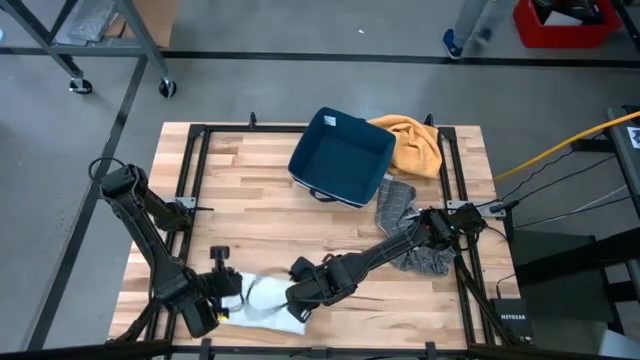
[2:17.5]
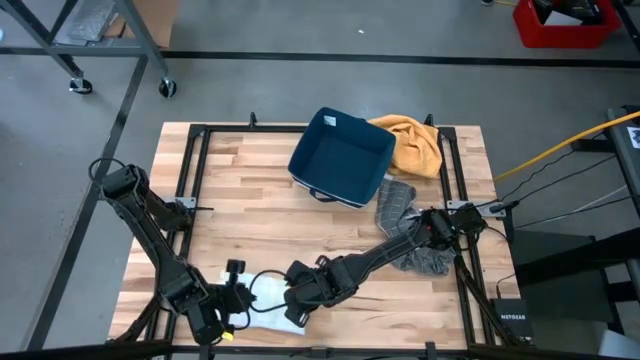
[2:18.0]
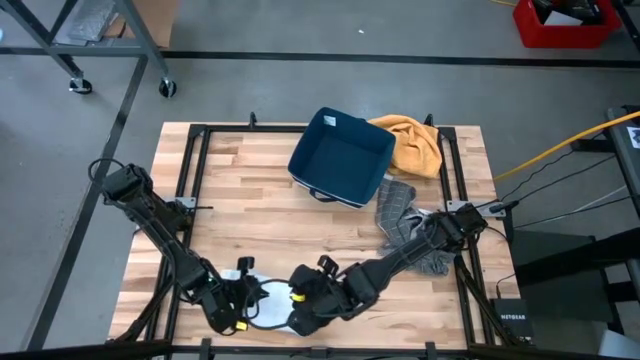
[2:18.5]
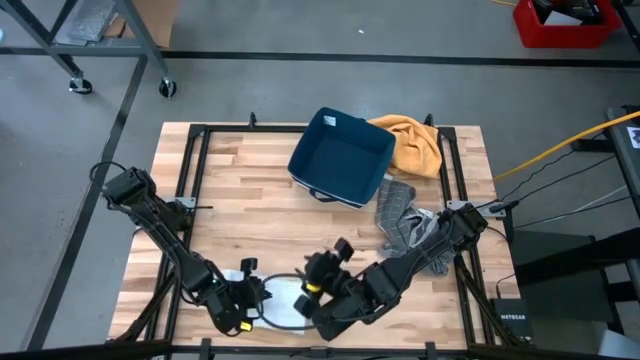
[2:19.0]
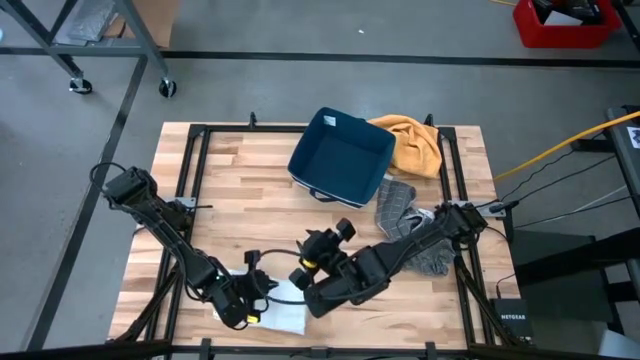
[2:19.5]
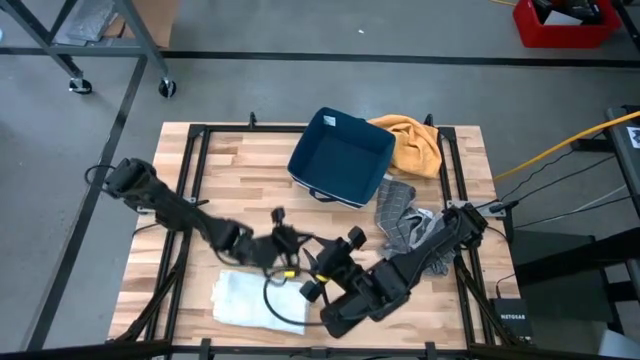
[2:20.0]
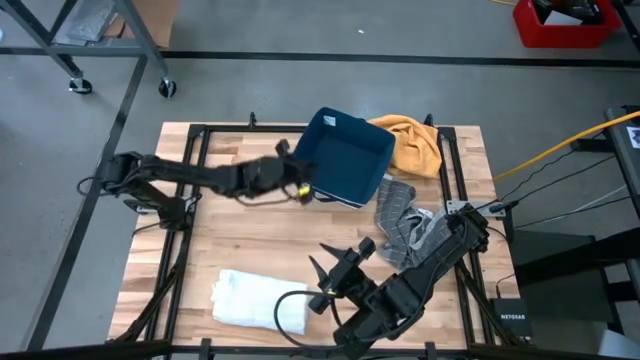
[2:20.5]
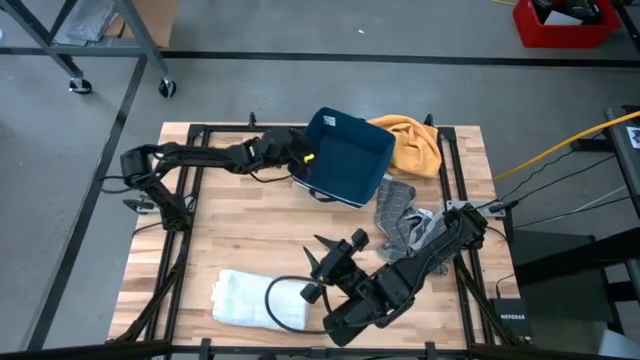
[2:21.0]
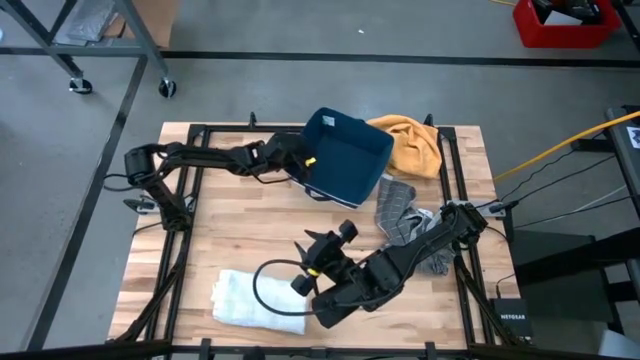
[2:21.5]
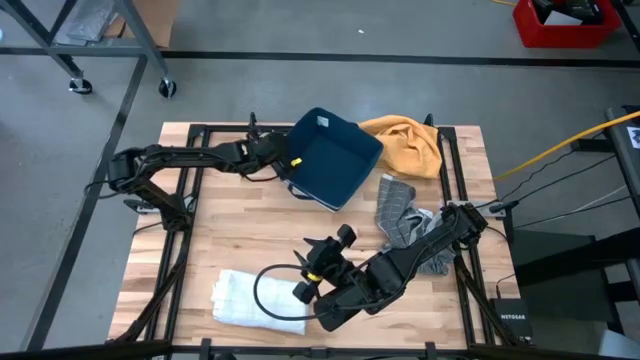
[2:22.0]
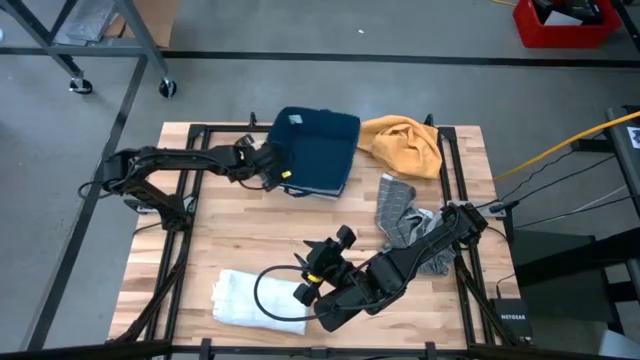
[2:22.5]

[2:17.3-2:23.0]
Task: Fold towel
Move the blue laundry bin to the top left

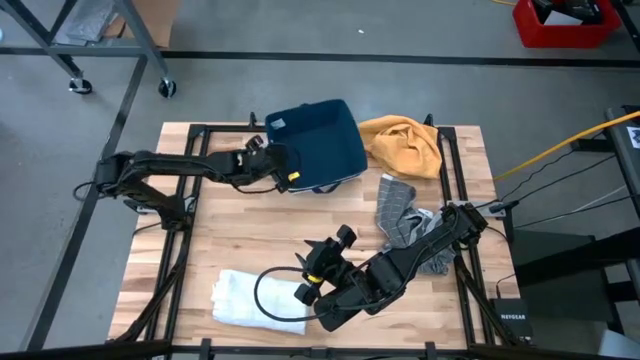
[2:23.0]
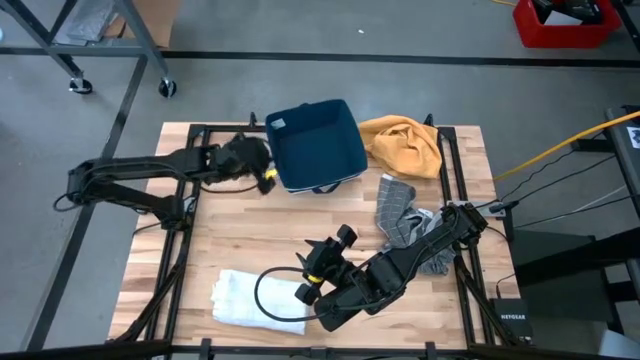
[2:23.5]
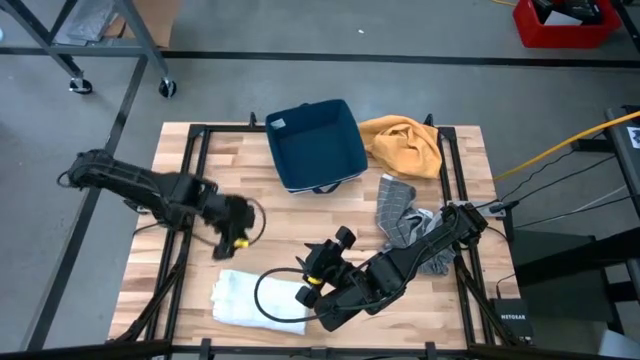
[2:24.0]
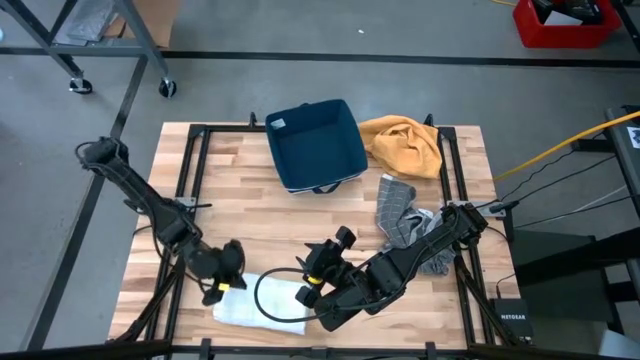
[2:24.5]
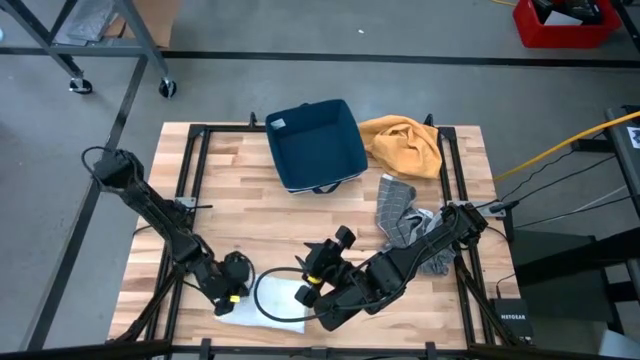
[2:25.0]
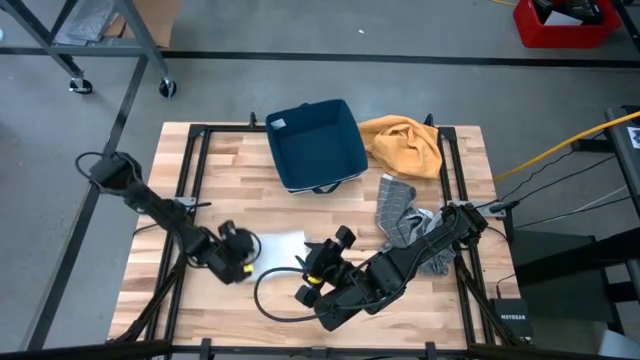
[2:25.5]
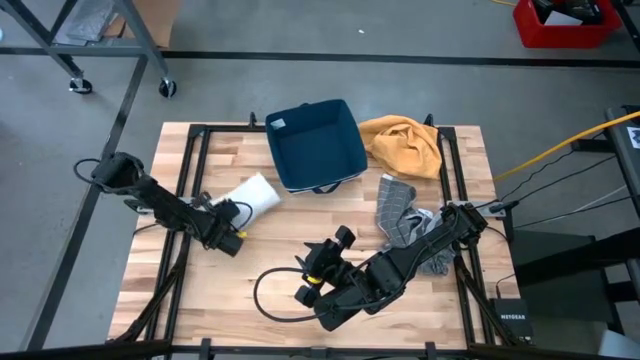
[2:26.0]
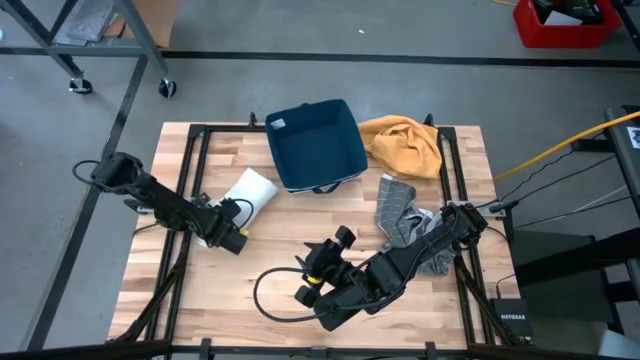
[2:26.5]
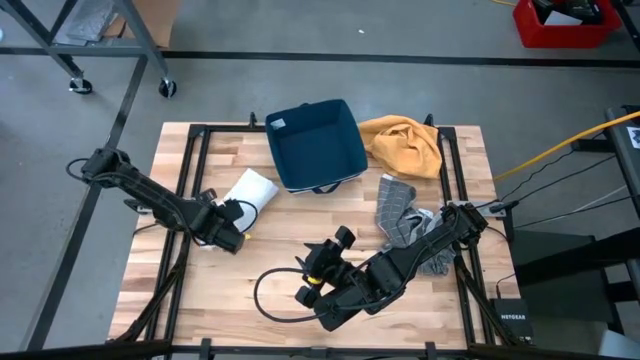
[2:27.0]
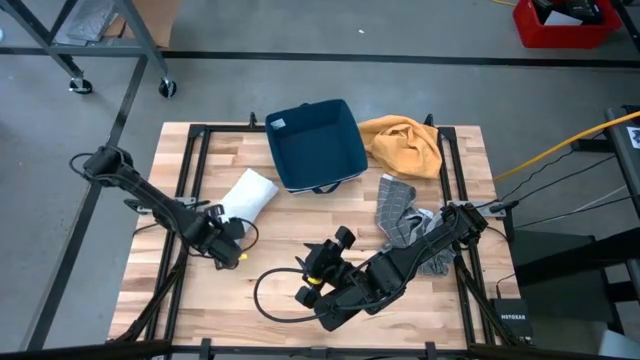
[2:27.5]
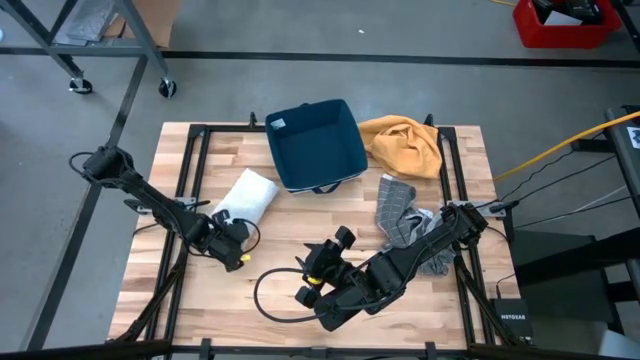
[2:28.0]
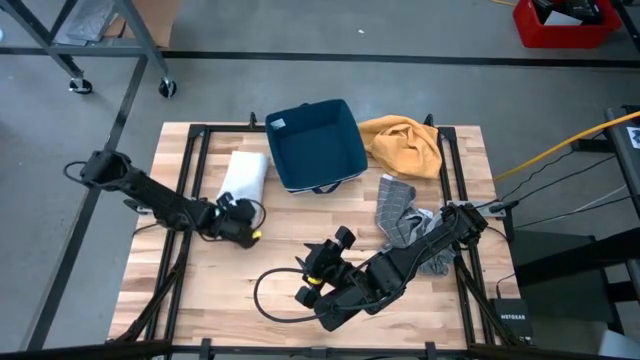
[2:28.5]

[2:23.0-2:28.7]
Move the white patterned towel to the top left

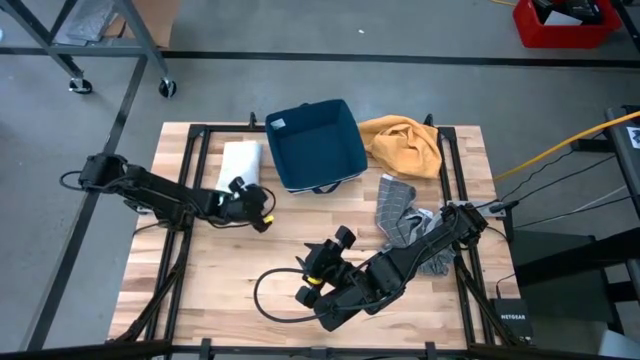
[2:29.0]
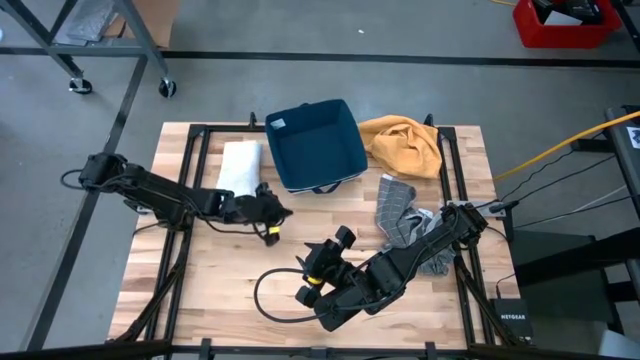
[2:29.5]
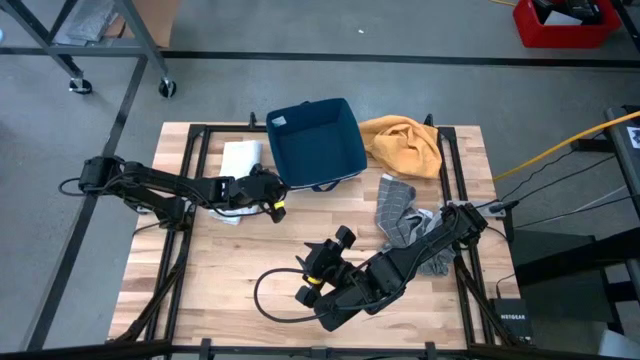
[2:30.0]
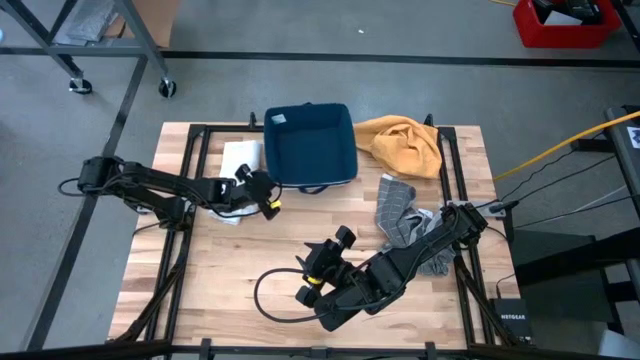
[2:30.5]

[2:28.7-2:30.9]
Adjust the blue laundry bin

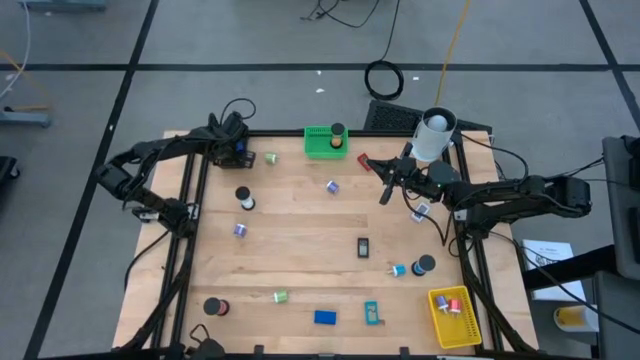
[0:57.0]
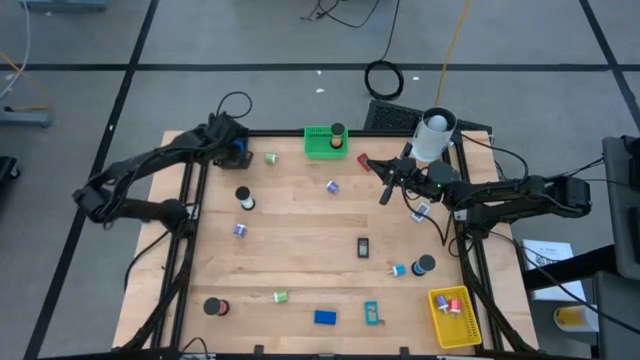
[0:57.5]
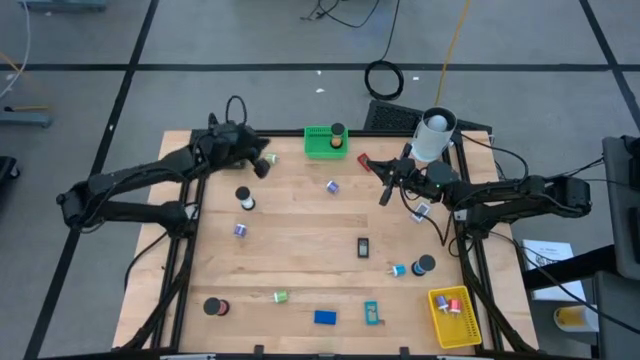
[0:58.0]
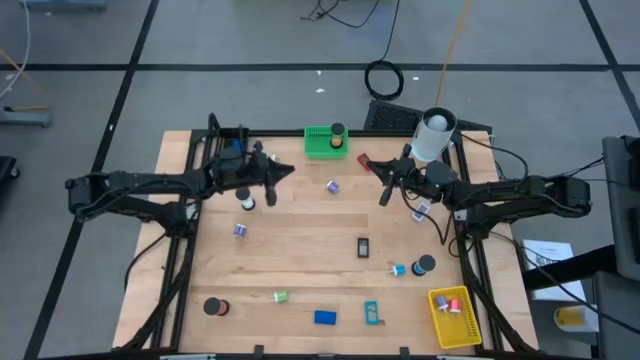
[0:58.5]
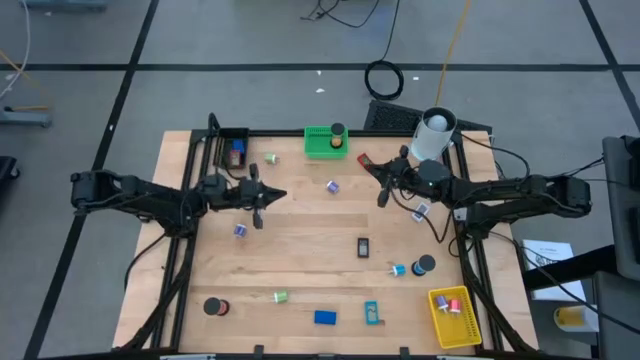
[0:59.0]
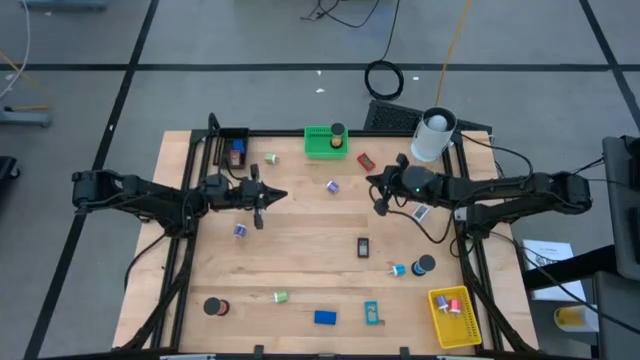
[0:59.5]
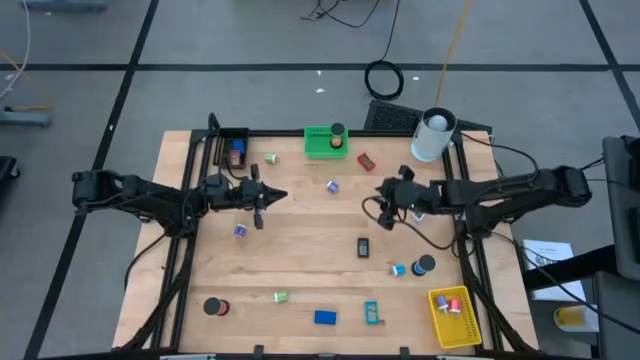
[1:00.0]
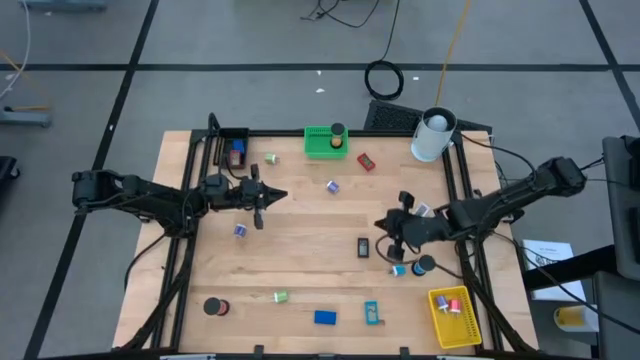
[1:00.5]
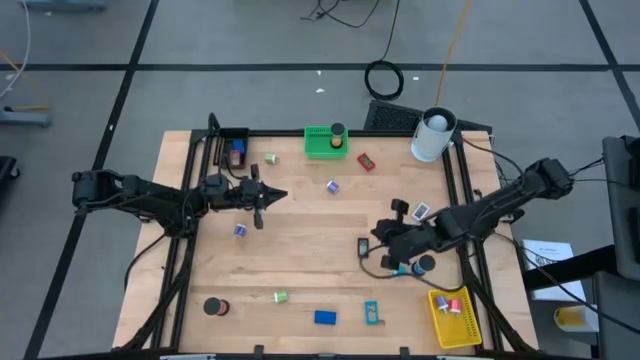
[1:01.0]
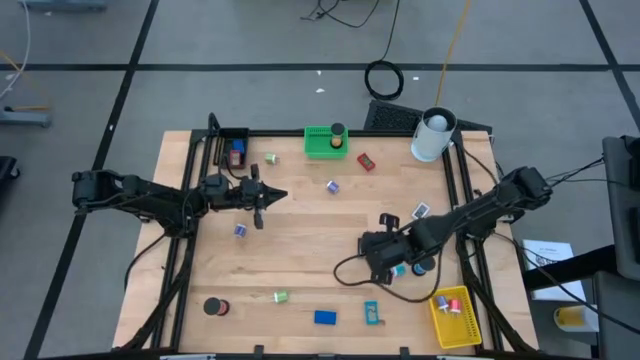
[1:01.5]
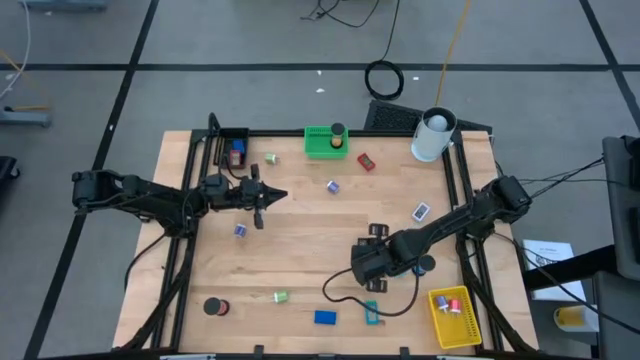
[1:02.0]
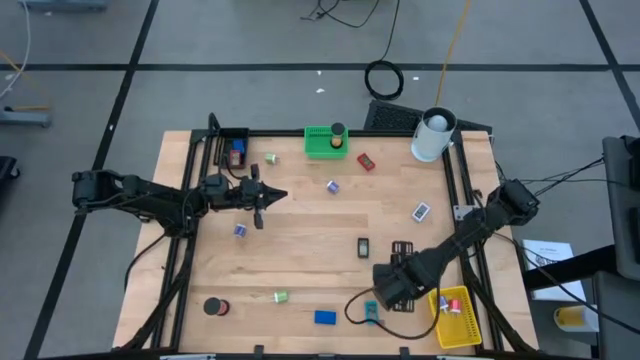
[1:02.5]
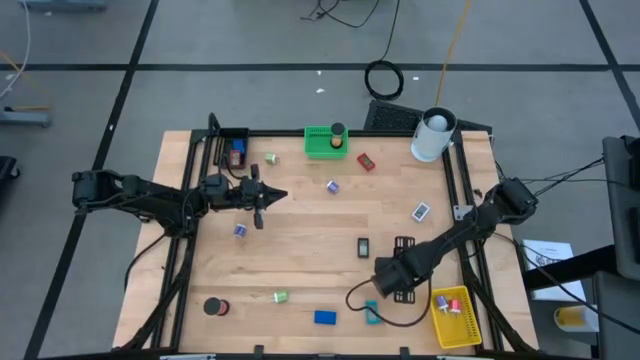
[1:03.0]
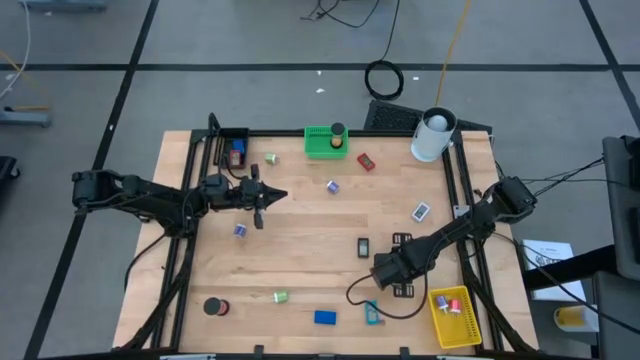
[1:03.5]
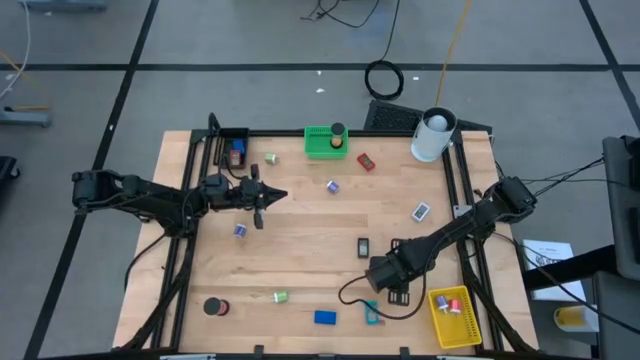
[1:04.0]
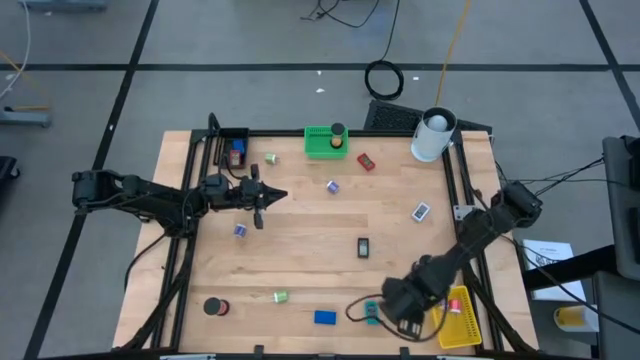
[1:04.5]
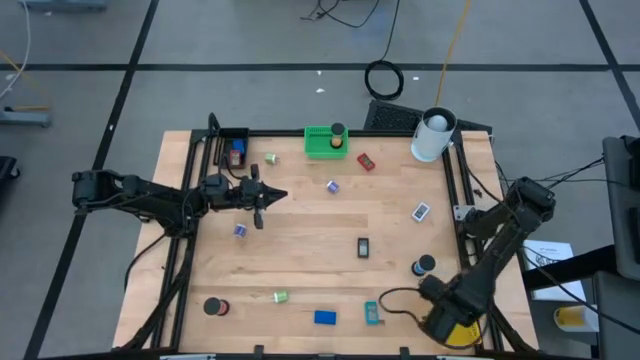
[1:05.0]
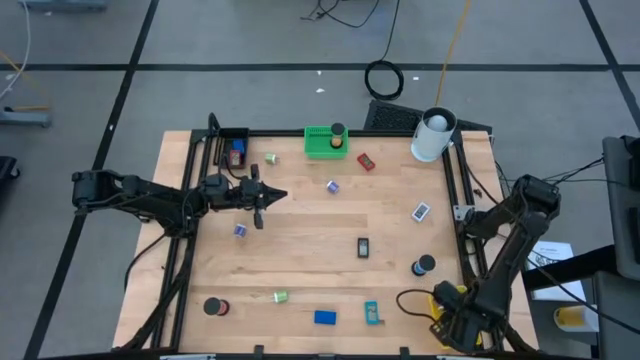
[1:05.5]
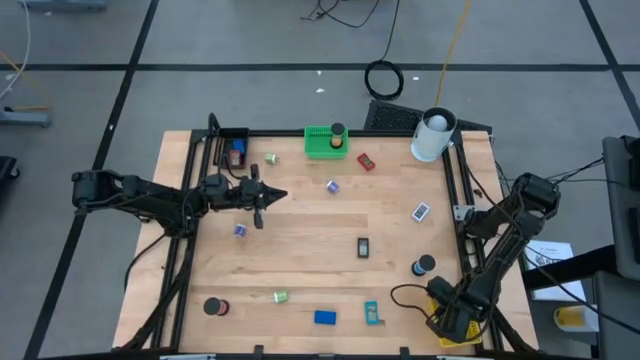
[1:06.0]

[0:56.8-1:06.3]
Task: Pick & Place Office items
Put the blue charger adapter into the yellow basket
